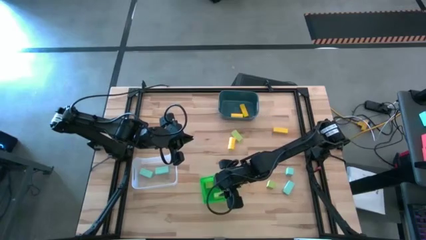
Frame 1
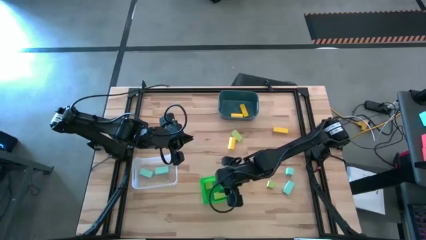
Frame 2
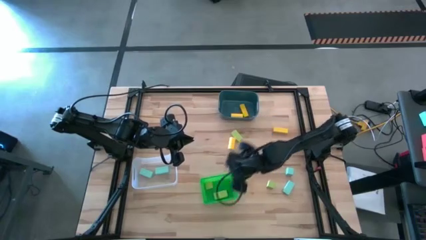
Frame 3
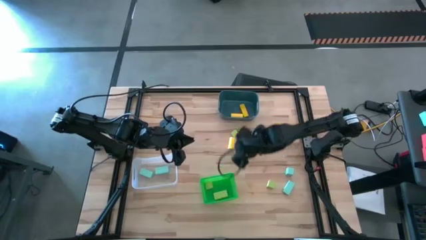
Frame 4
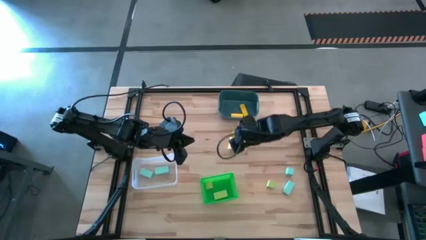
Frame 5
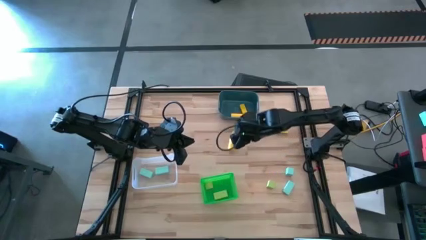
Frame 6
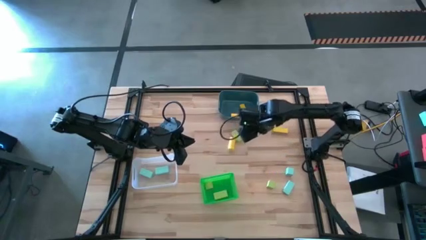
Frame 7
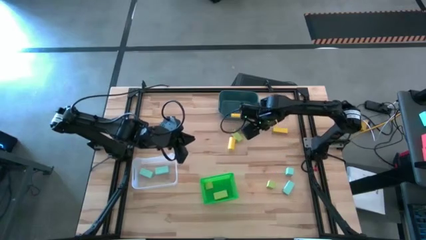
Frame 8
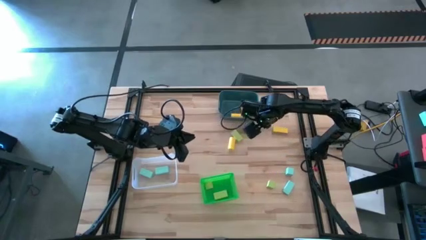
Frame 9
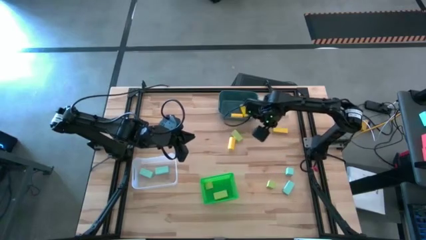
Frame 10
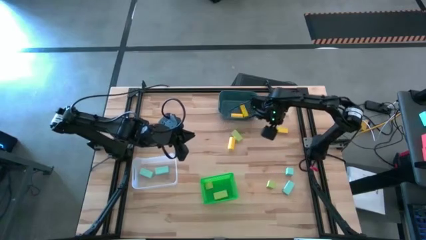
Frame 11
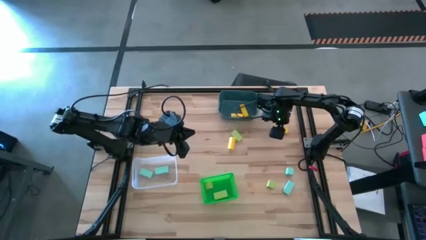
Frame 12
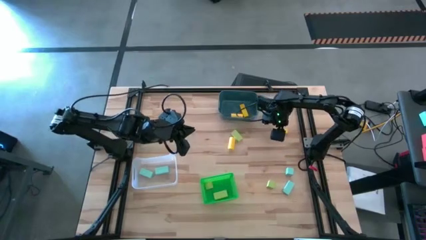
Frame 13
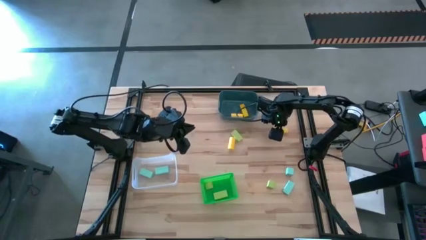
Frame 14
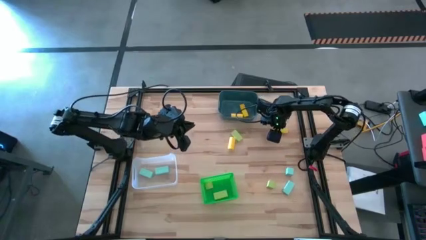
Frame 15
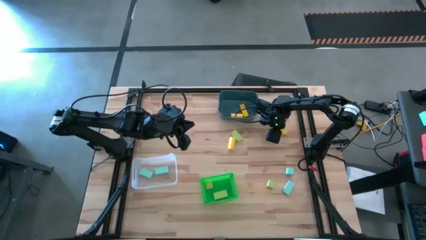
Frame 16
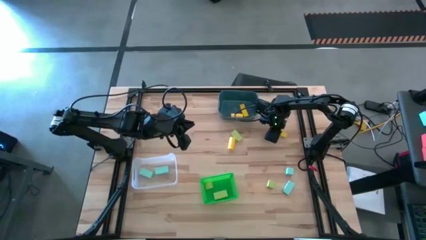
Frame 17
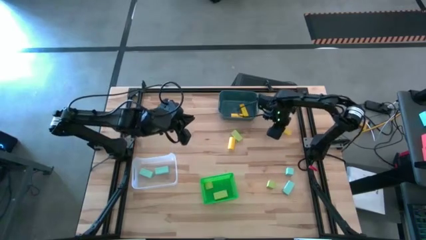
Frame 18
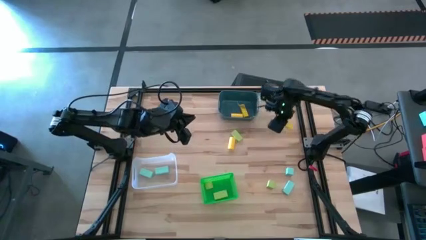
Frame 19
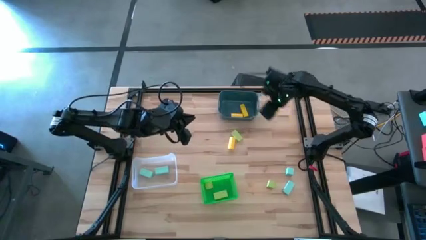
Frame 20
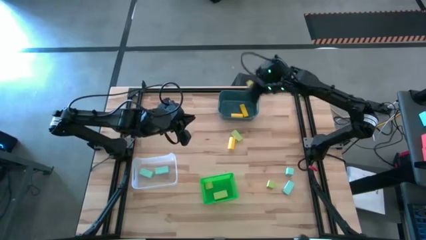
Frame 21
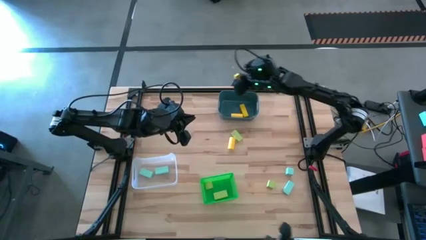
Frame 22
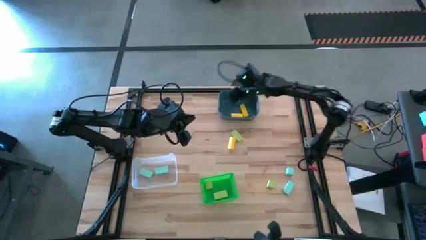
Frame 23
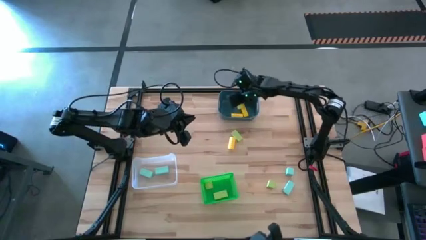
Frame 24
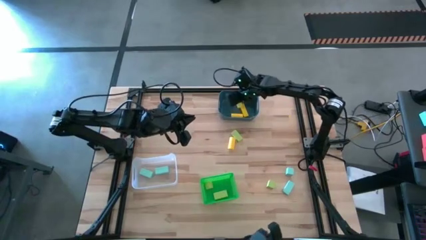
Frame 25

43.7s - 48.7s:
Task: Sort & place blocks by color
Put the right yellow block into the blue bin

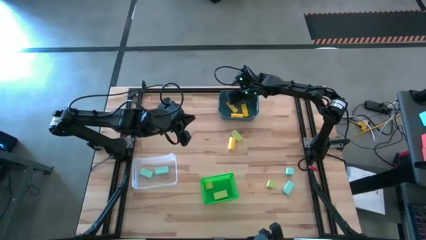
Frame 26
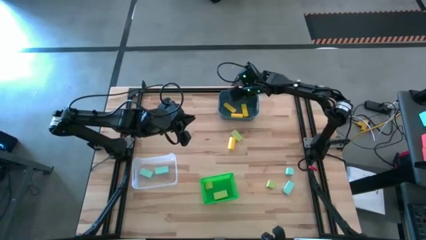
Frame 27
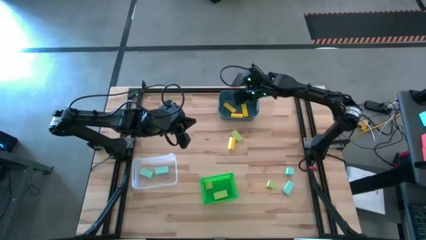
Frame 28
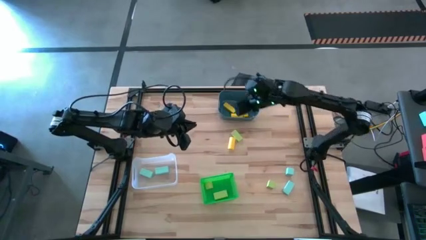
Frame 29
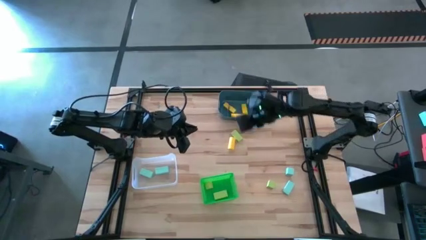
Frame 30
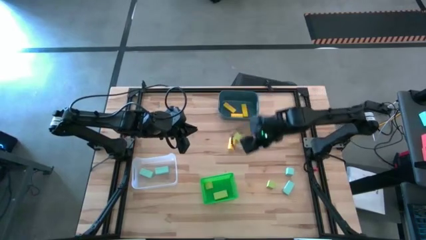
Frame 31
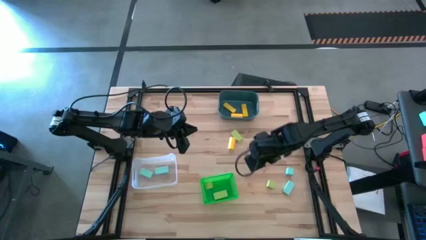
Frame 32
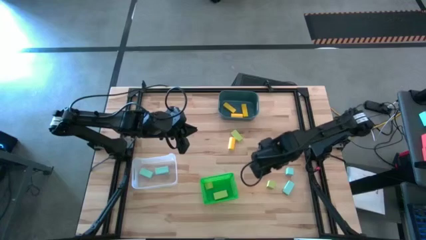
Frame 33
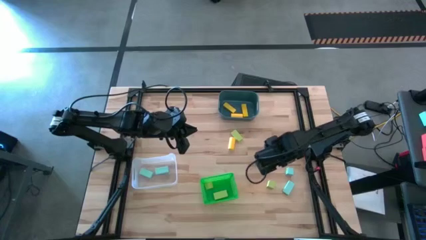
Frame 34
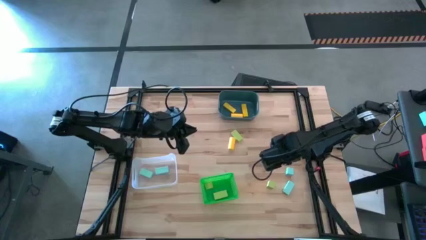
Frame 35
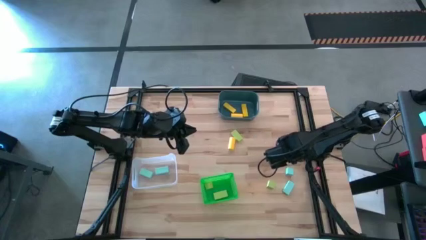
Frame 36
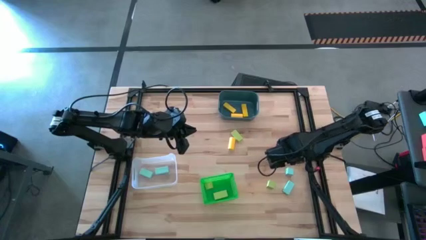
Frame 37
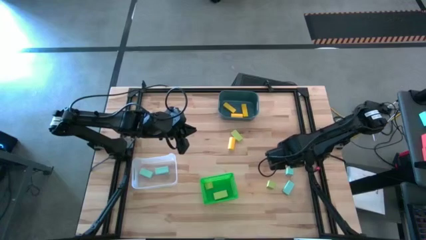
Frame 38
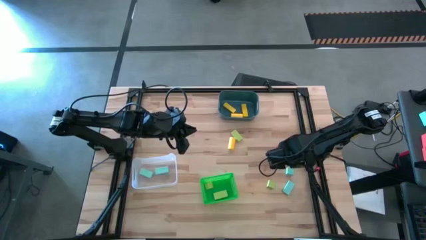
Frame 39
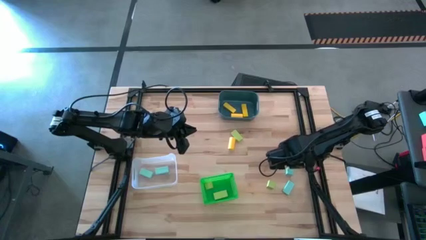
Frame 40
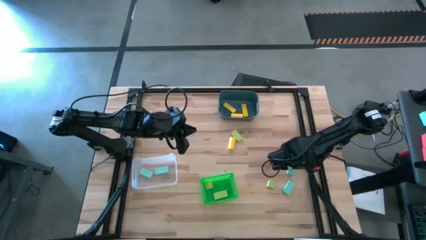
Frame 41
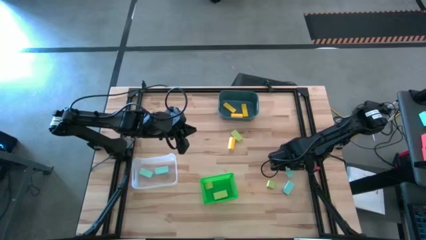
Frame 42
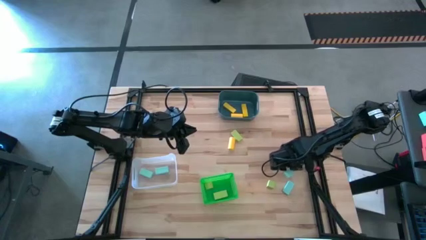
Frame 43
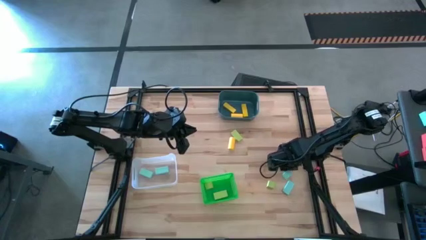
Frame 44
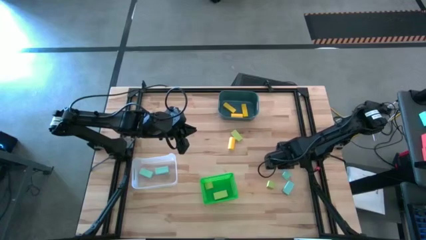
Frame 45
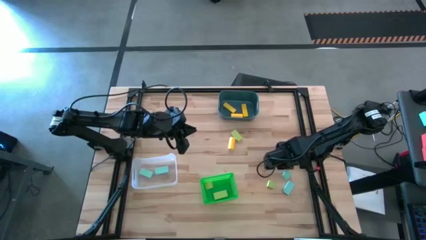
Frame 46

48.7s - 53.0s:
Put the top blue block into the transparent bin

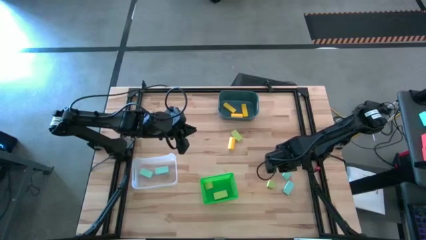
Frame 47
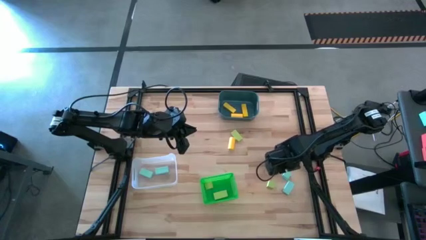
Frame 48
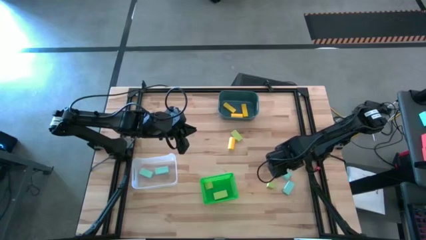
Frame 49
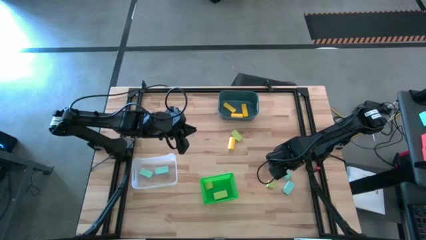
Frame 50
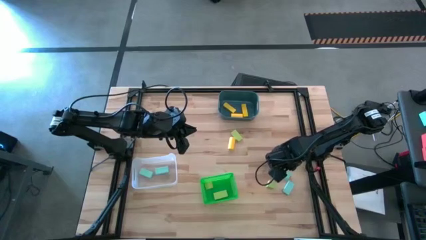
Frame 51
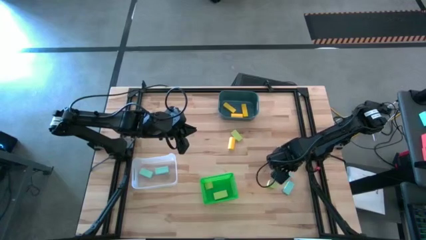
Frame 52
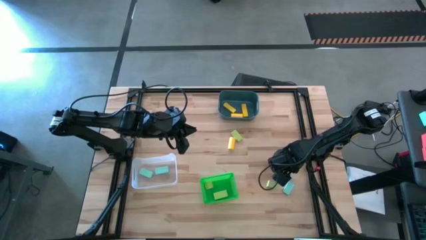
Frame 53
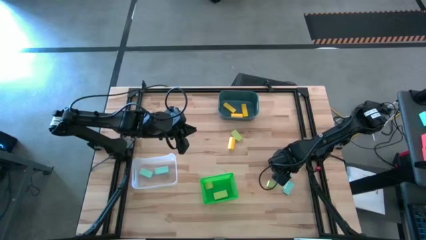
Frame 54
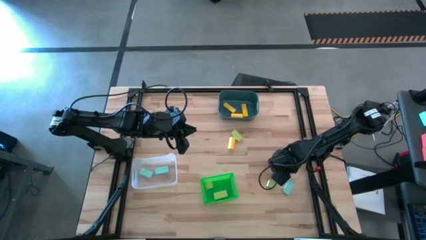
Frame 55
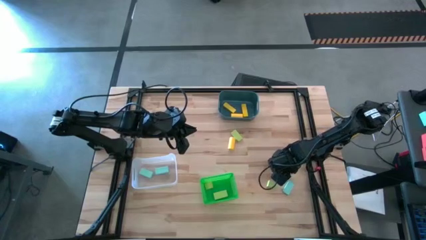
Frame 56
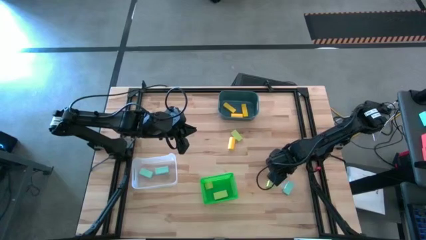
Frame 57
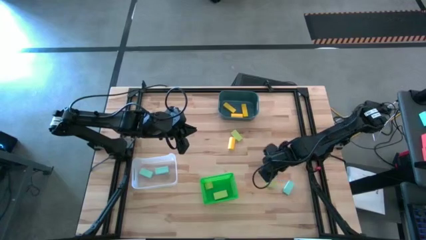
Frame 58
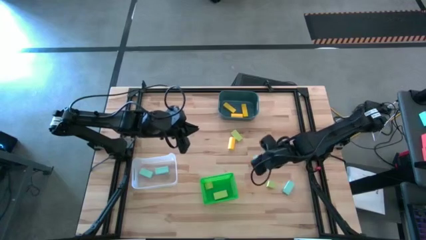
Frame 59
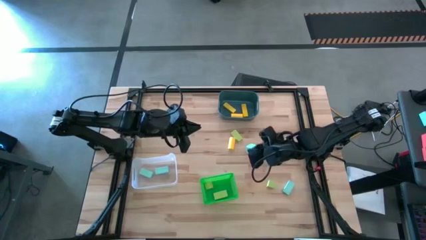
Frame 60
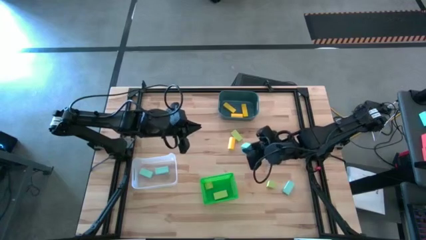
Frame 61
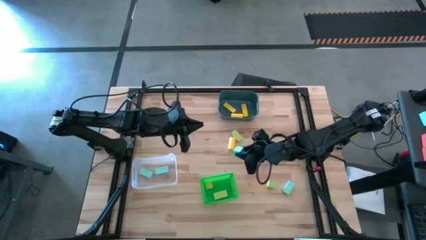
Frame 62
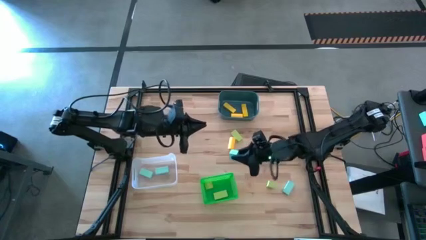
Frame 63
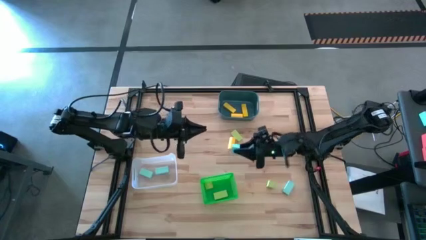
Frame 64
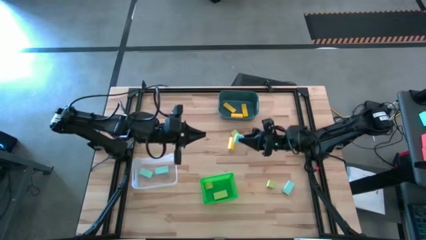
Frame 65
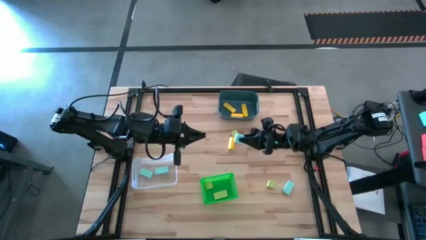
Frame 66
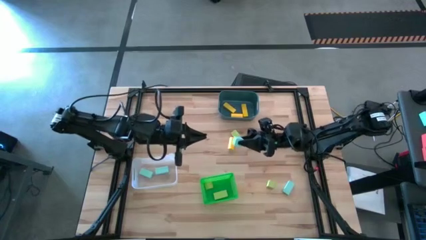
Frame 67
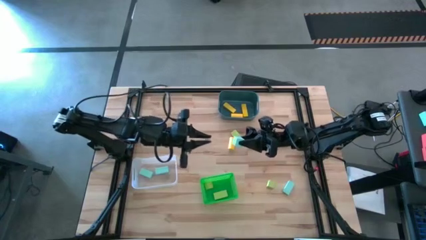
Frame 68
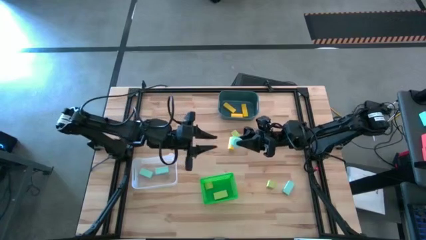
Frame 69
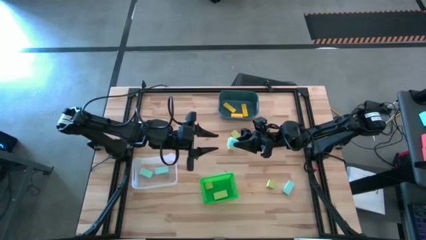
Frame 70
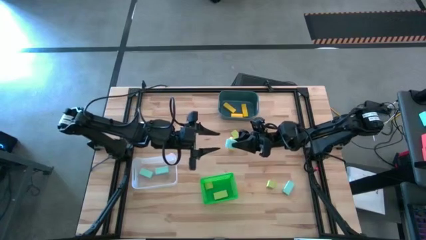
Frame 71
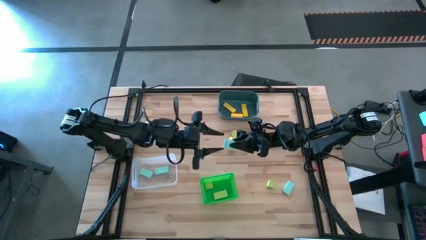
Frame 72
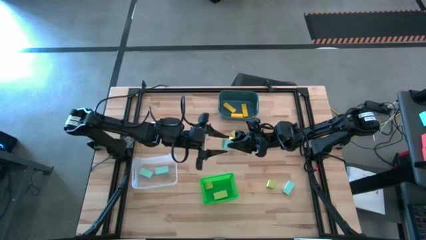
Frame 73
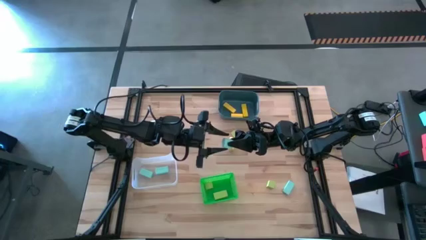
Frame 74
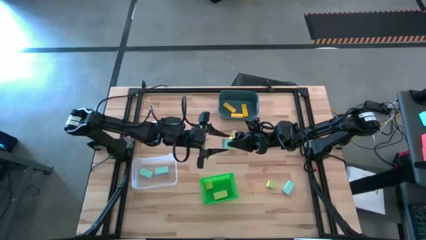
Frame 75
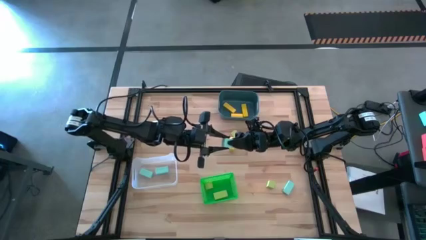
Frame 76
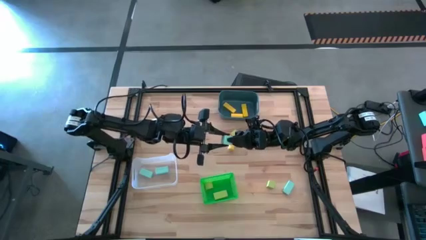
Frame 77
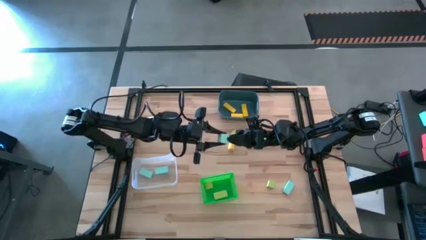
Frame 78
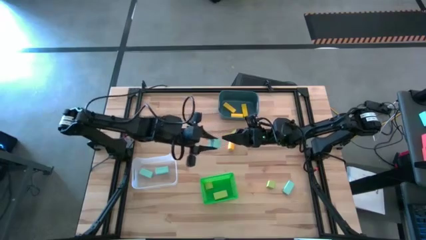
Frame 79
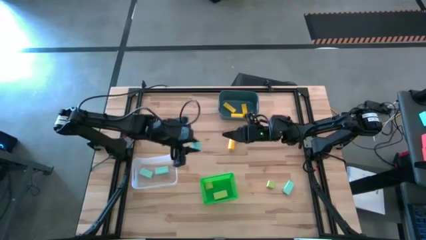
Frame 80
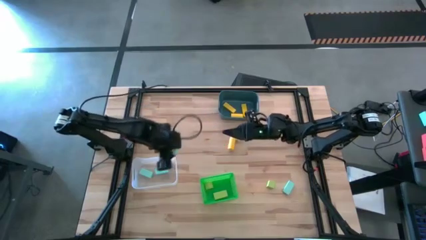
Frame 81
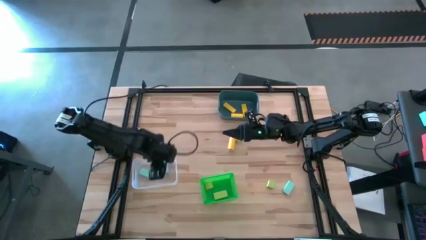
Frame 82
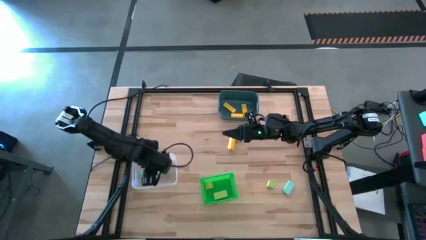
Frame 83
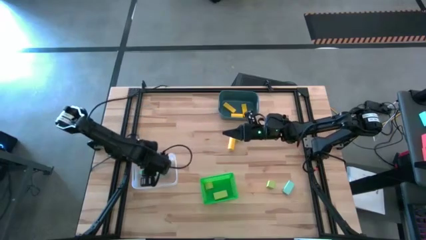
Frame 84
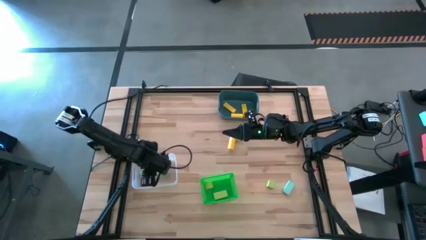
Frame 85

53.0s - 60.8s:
Put the top blue block into the transparent bin
